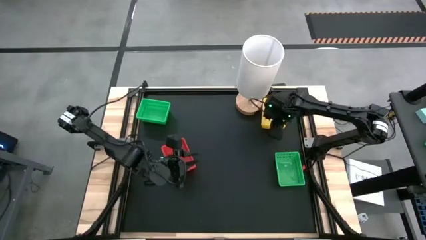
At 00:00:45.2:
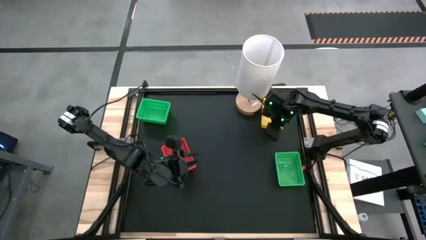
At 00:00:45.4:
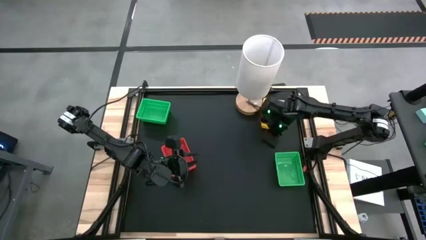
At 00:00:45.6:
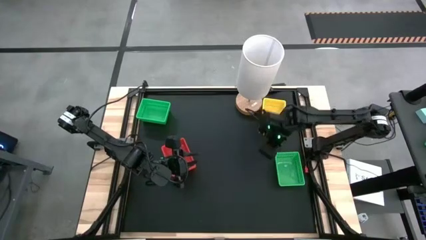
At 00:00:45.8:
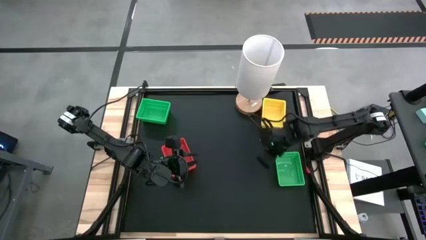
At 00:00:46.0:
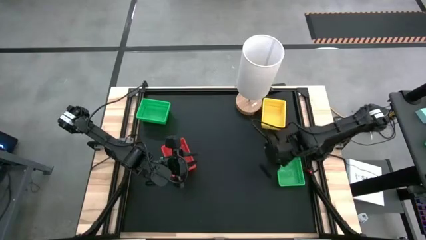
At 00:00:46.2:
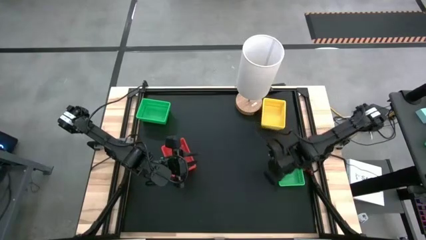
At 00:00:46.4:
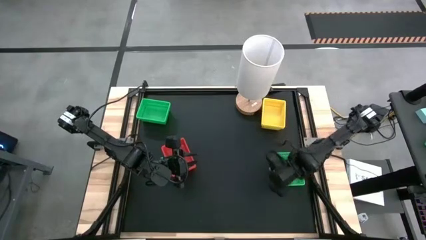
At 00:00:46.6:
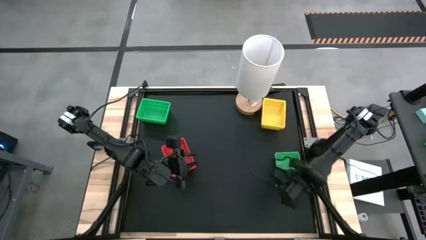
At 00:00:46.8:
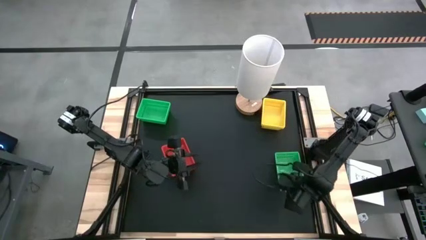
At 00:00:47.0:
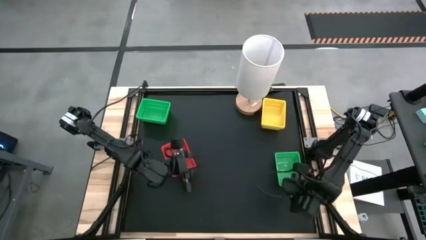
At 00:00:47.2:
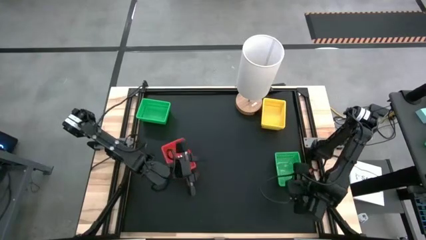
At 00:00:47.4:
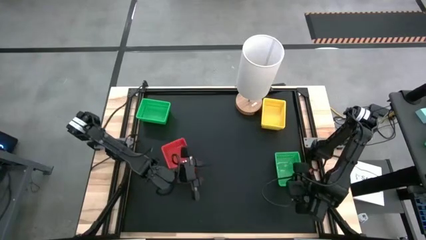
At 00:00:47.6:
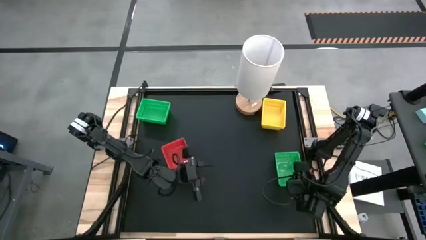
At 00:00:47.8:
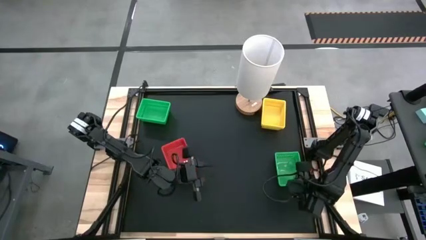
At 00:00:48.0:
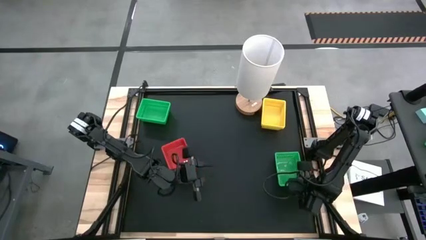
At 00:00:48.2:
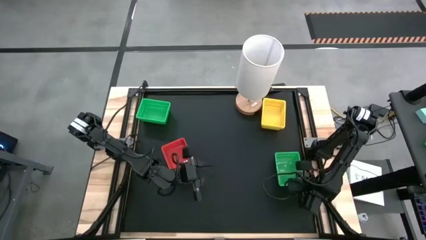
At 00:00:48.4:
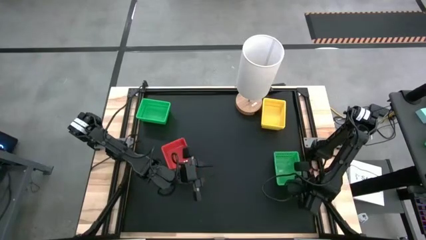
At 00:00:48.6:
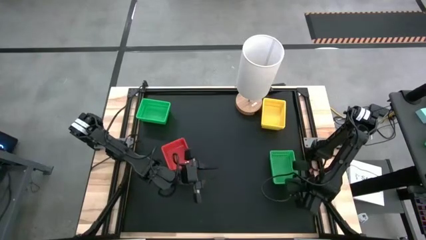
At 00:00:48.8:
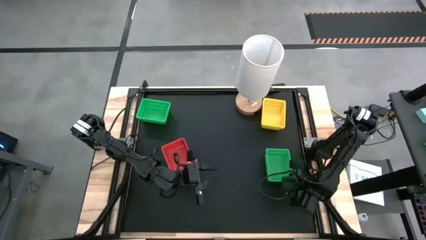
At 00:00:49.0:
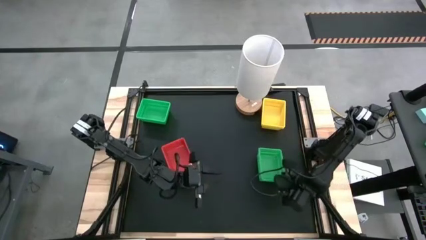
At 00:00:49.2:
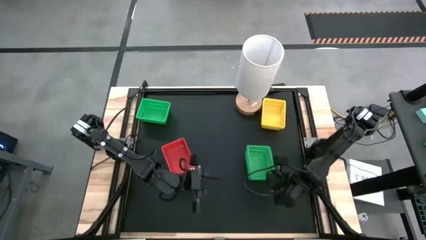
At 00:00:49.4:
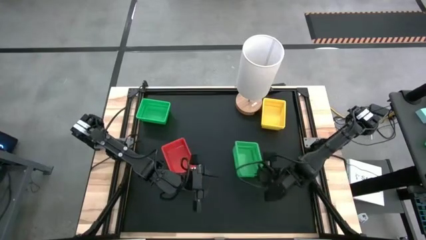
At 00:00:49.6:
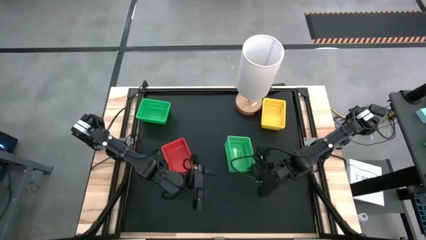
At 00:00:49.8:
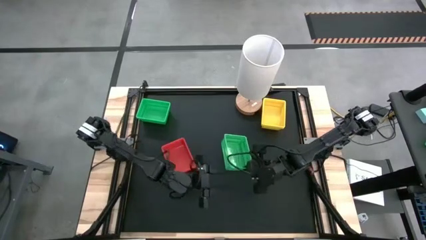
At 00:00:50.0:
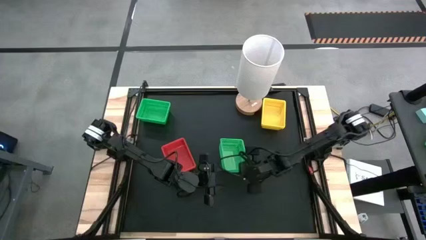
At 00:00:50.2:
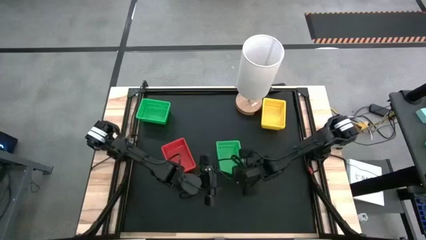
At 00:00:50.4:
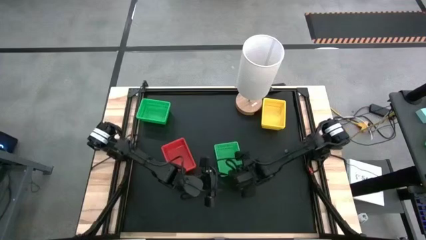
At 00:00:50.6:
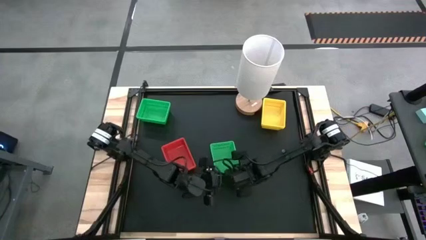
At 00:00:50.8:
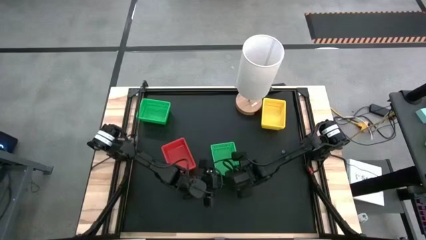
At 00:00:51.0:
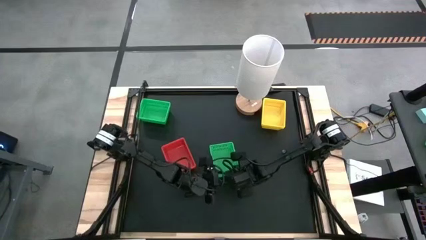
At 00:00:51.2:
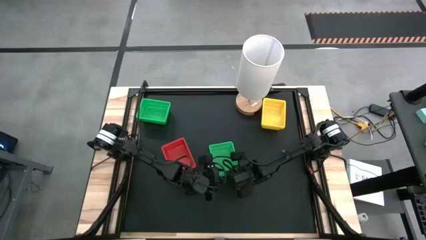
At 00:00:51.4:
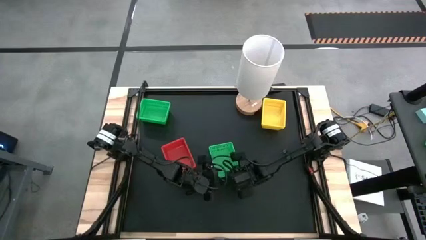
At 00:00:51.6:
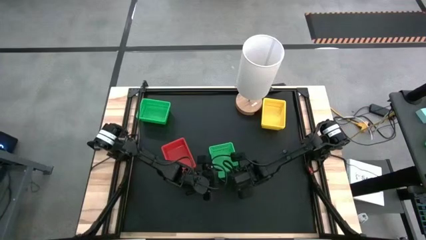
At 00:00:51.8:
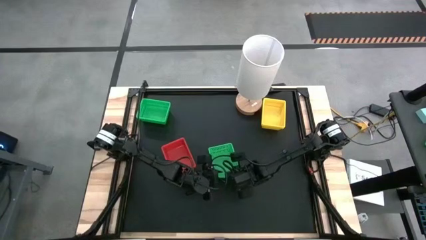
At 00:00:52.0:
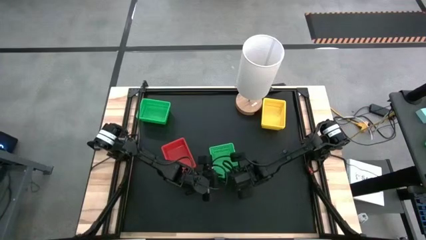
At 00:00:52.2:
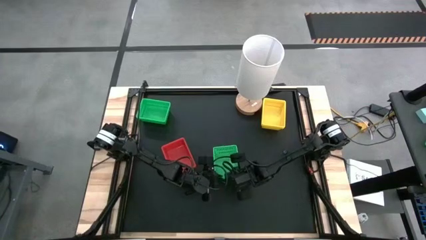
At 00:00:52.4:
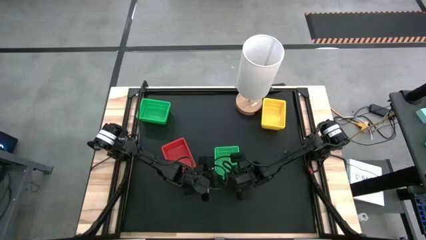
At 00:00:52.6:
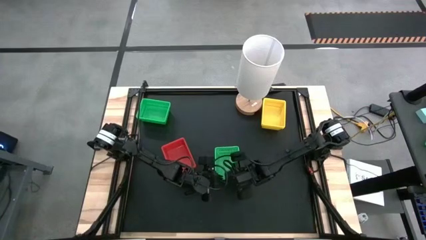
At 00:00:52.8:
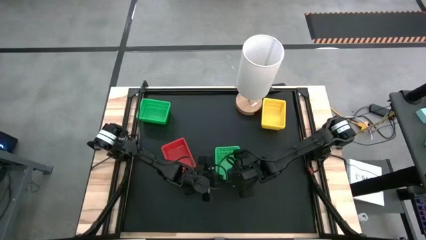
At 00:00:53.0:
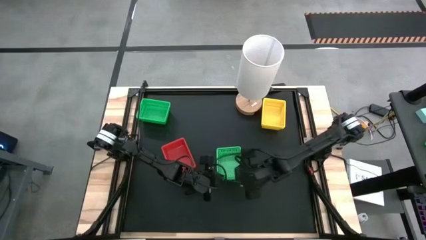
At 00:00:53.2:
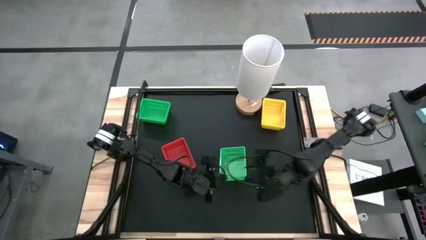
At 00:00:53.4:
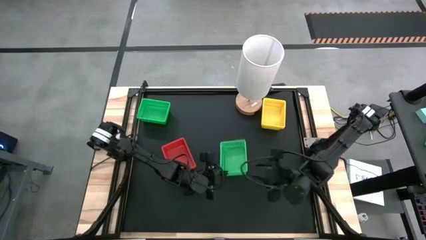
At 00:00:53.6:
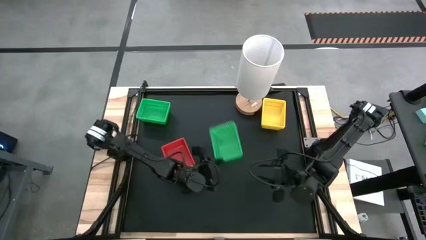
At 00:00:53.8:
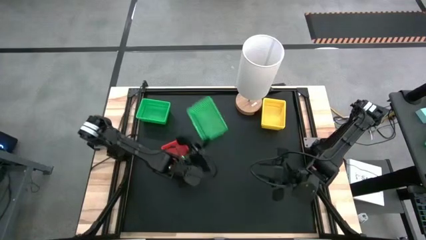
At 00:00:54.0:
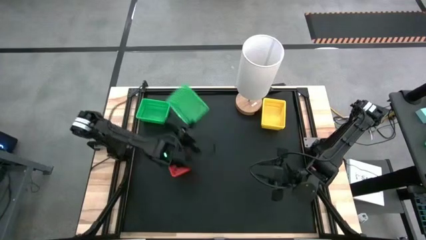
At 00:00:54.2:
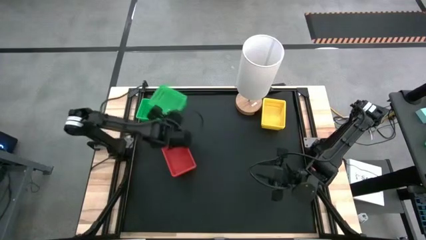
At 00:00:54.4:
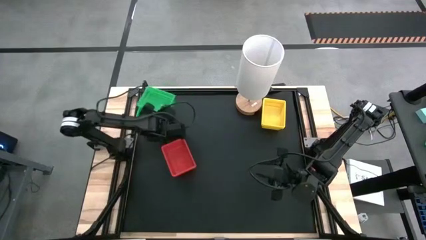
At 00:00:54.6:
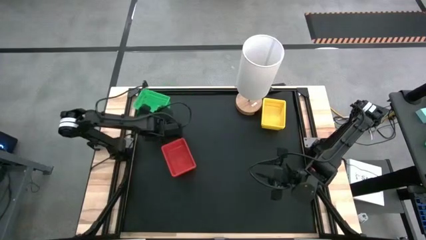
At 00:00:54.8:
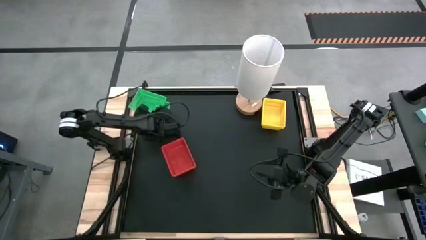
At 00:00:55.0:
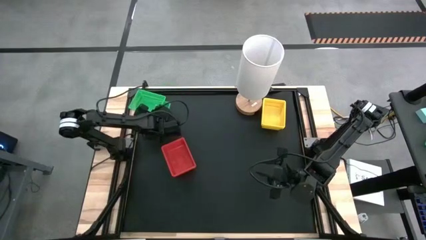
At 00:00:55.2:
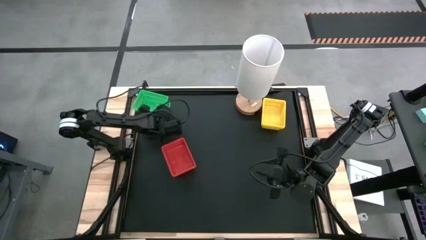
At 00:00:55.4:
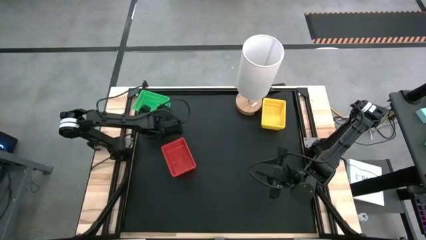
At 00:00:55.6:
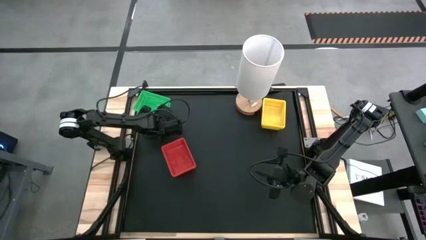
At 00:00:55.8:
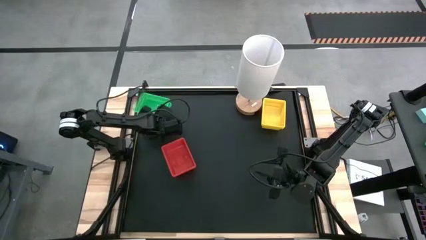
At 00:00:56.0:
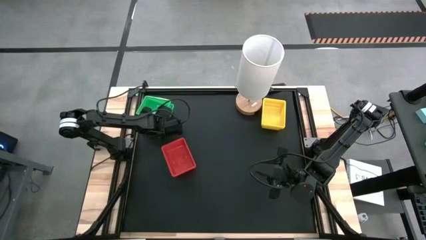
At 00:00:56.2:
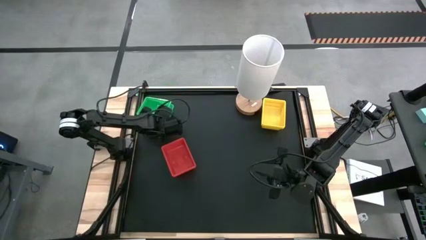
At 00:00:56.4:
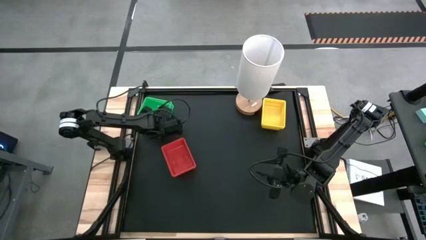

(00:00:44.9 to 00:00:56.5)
Stack the bottom green bin on top of the top green bin

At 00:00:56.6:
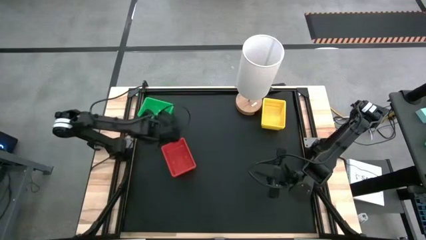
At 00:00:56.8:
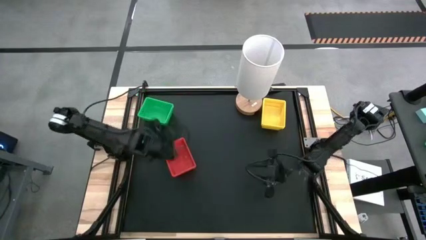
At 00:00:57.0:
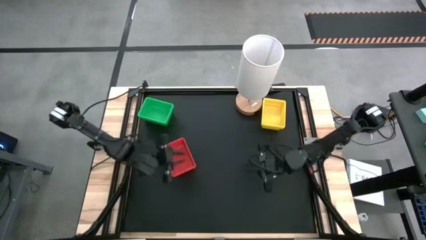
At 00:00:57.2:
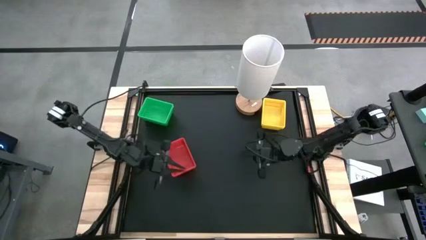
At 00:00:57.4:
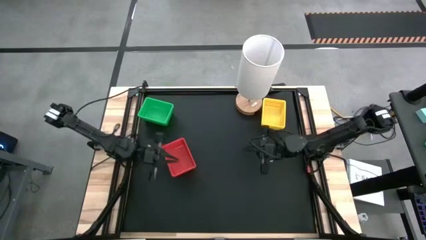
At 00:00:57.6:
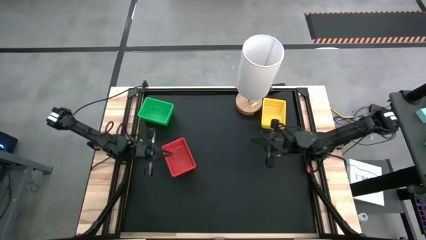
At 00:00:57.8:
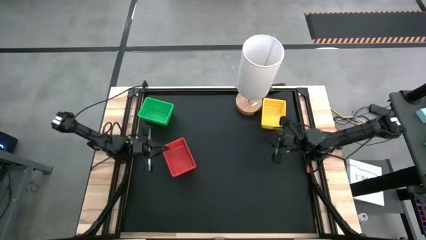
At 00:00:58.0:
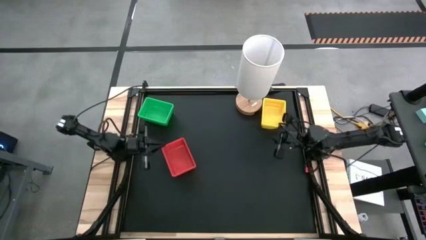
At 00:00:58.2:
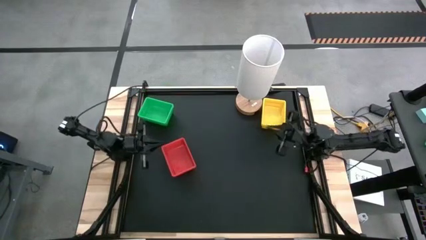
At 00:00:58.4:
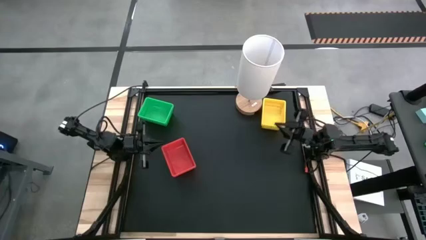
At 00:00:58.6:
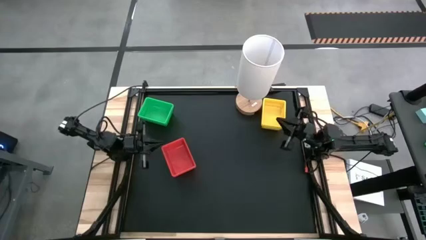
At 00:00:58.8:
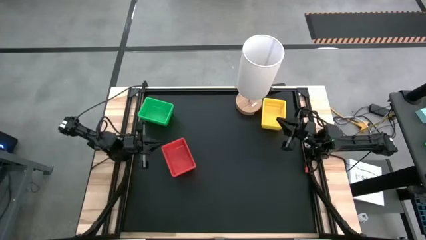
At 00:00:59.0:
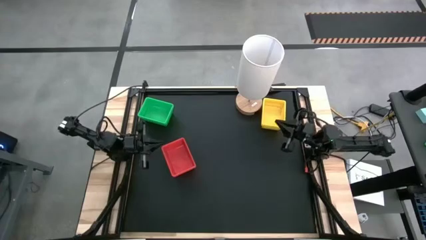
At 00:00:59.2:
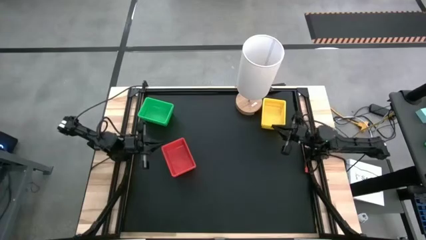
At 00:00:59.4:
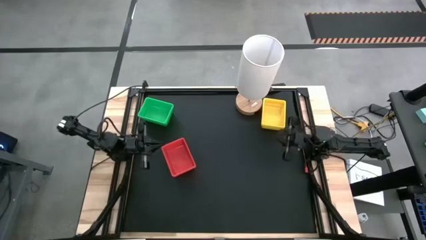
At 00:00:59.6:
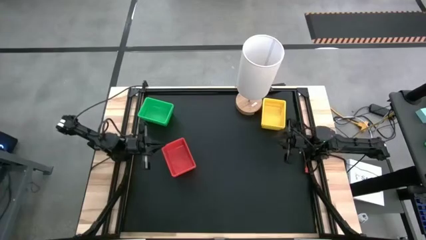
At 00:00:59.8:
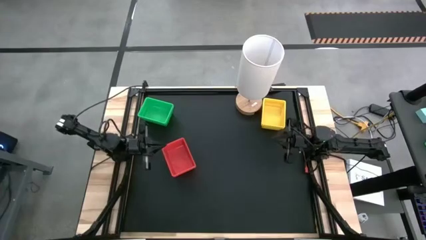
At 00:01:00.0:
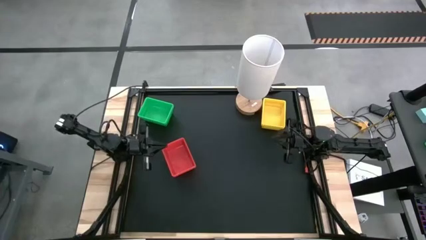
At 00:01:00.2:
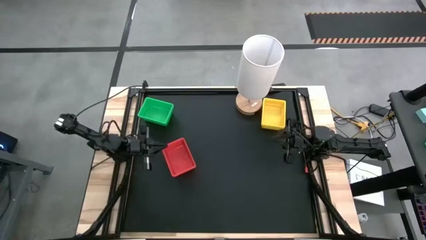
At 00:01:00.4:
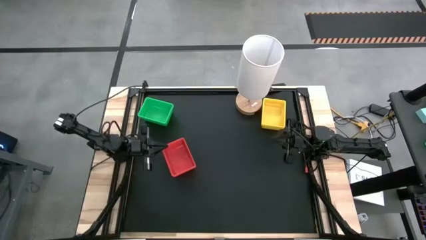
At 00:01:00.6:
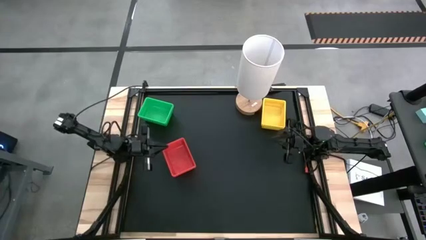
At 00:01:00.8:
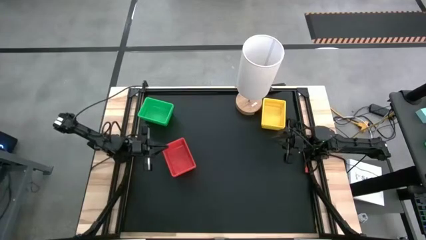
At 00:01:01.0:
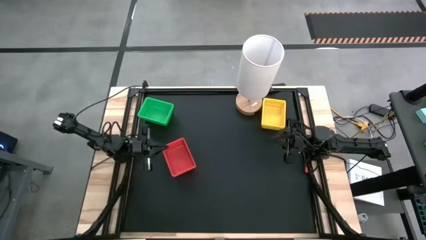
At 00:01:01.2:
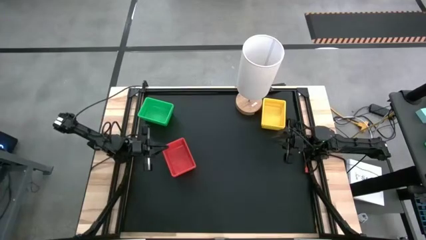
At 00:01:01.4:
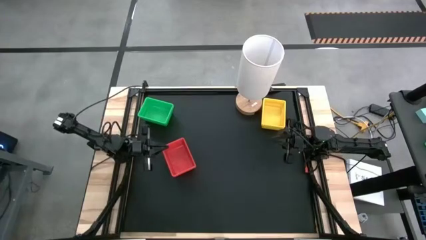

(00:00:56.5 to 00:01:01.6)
Return to Home Position
